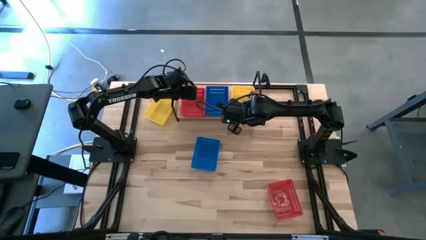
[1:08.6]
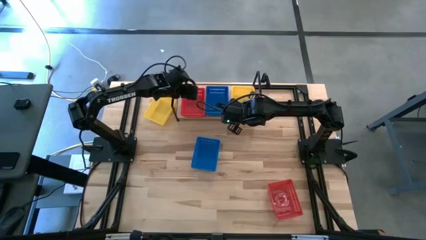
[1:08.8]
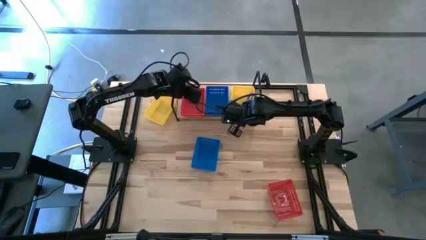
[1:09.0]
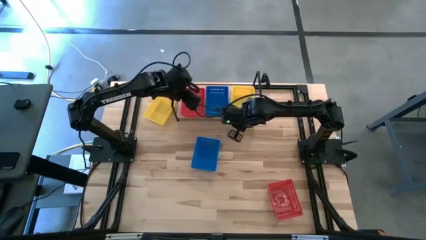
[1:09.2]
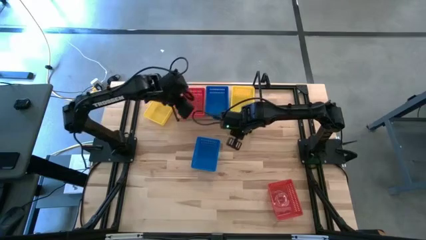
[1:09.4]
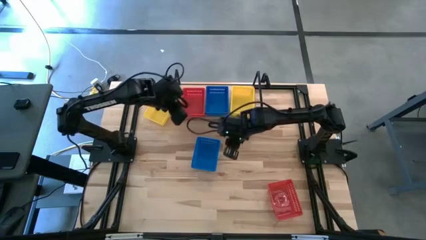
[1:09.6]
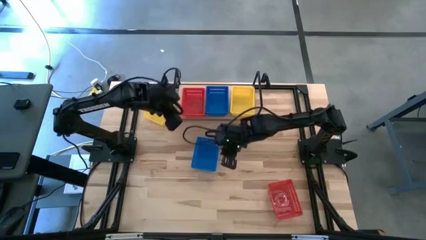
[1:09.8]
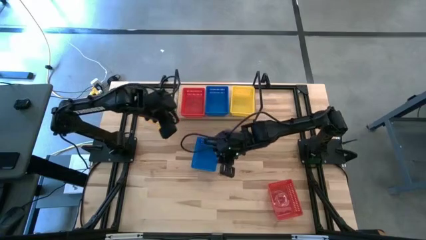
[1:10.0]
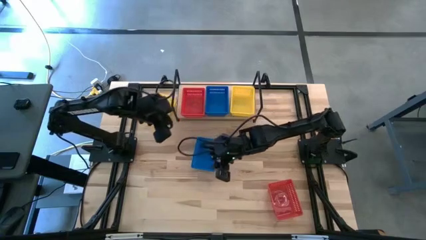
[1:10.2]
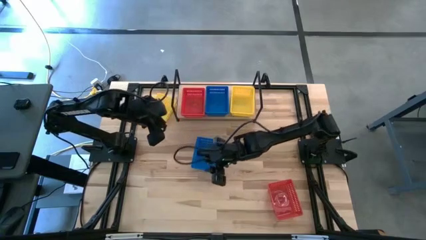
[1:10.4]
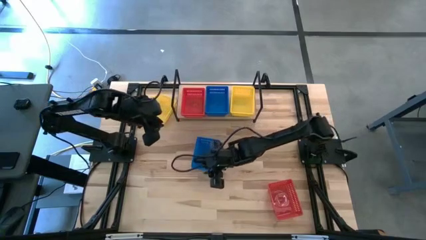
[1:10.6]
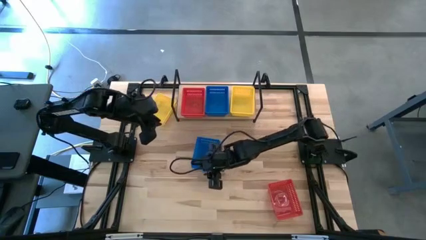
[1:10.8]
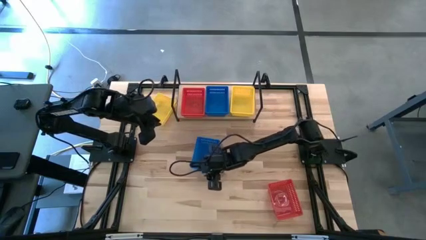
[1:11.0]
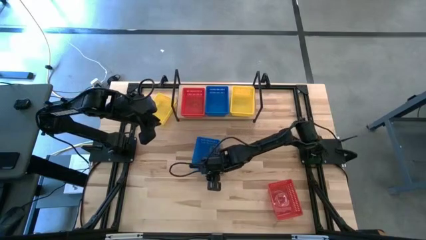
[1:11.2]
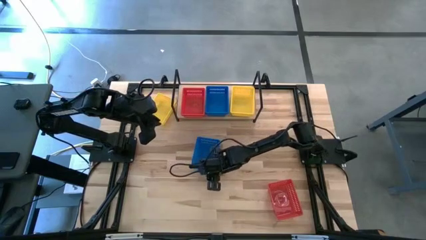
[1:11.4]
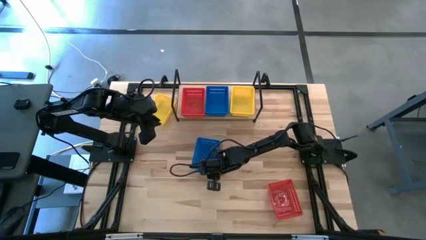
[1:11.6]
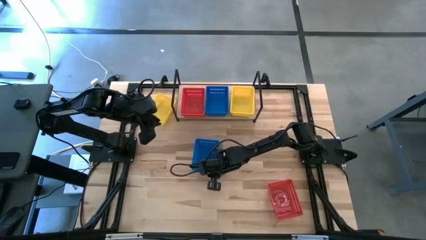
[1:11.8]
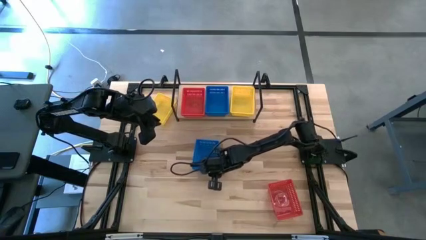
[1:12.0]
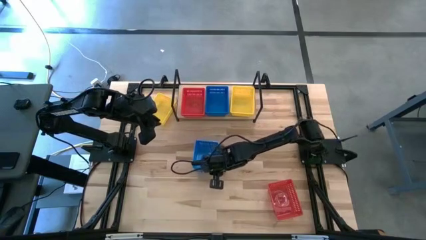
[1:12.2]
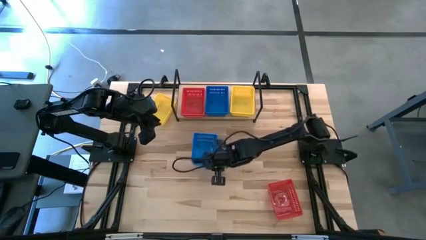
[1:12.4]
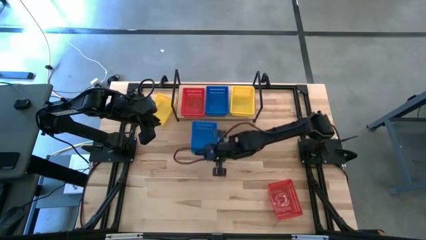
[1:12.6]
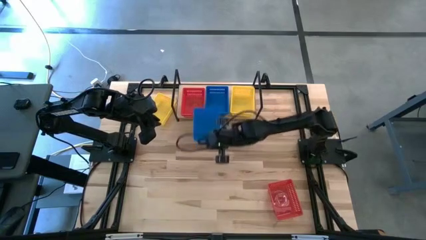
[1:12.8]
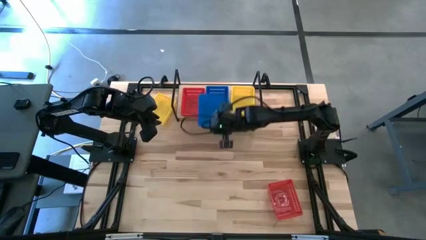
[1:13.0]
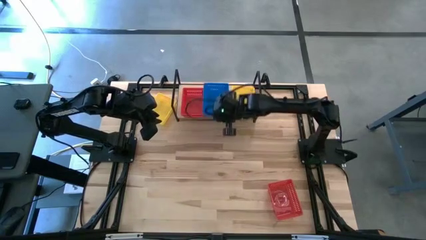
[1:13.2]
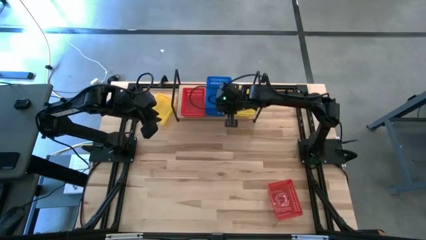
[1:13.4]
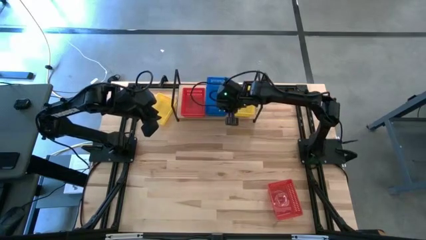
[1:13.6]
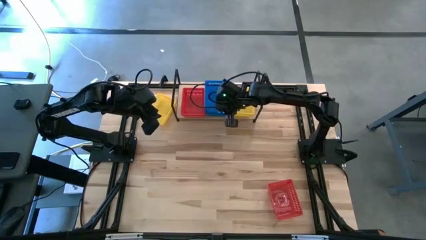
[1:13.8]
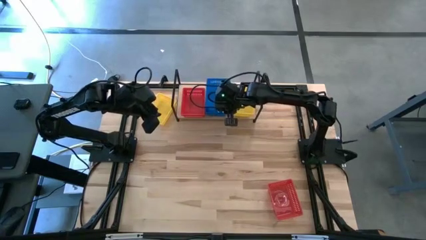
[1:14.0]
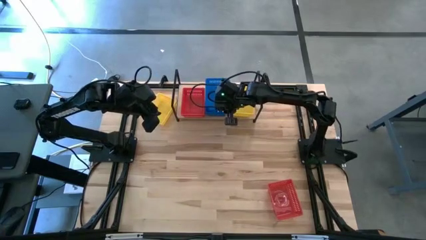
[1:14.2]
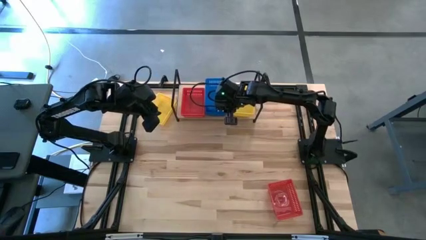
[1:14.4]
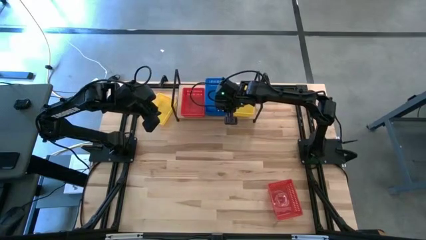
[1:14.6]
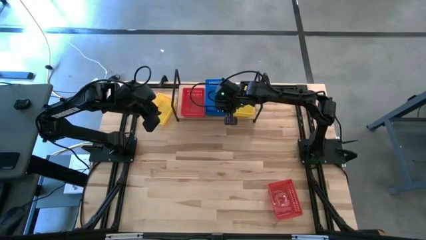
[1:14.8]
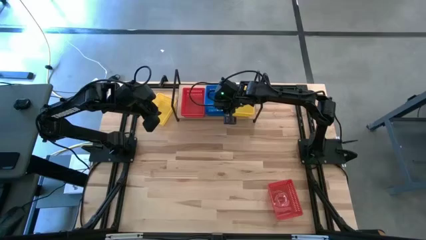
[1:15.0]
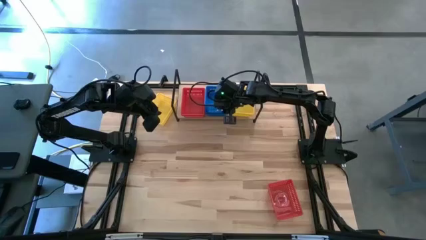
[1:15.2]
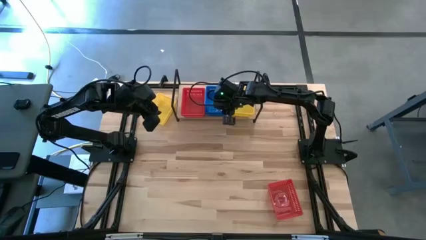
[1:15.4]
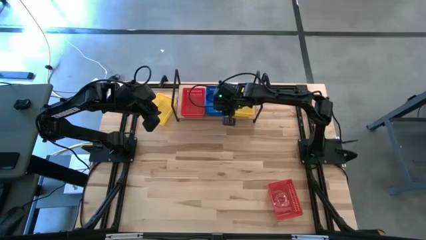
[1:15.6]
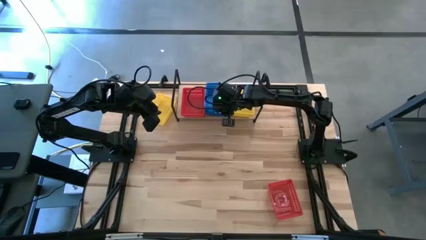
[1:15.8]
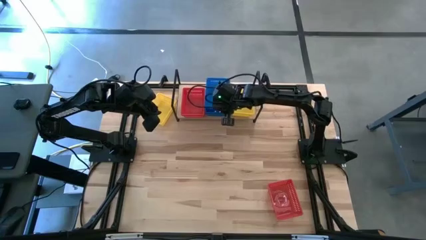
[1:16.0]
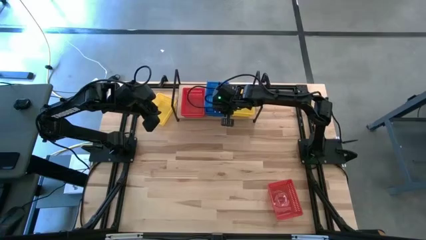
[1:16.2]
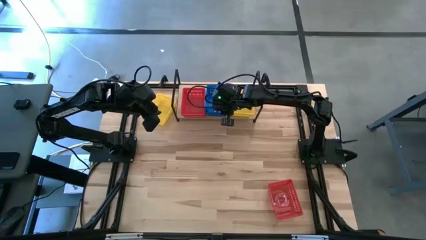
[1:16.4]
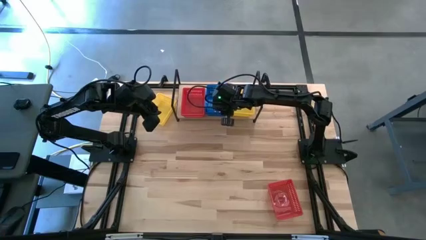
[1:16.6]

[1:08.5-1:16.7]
Task: Stack baskets on shelf by color
Stack the blue bin on top of the blue bin on the shelf

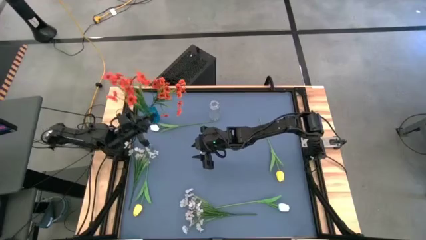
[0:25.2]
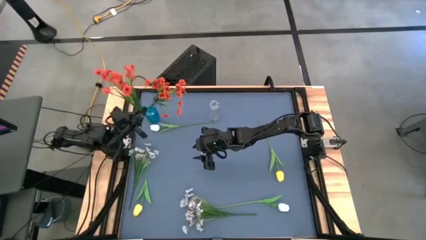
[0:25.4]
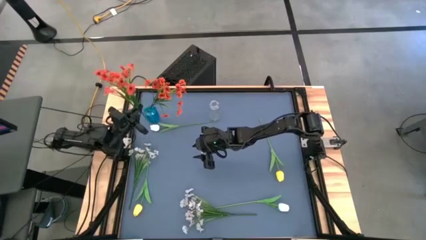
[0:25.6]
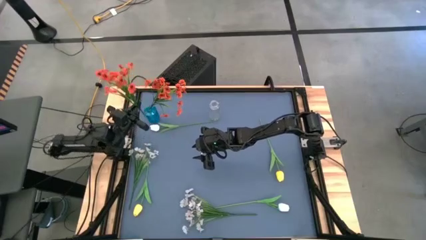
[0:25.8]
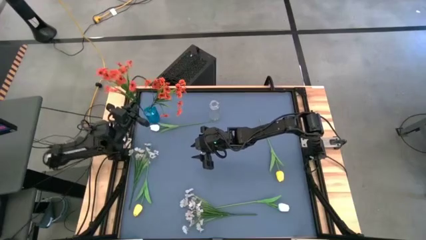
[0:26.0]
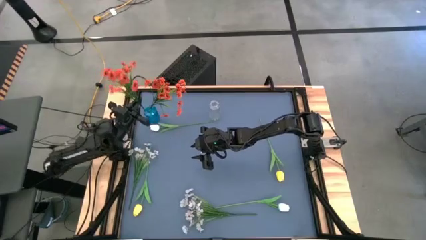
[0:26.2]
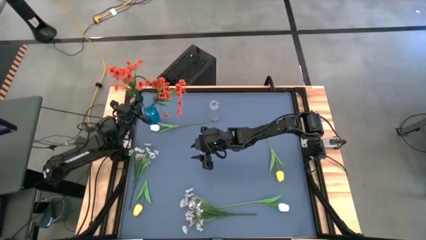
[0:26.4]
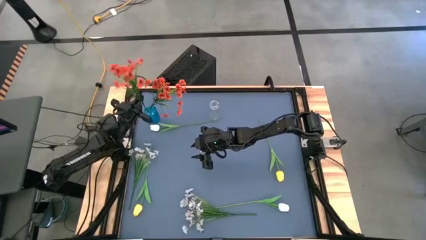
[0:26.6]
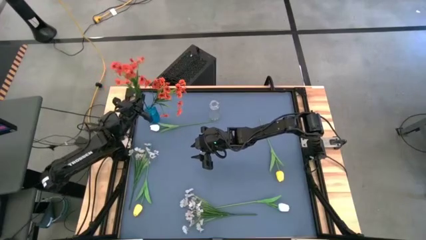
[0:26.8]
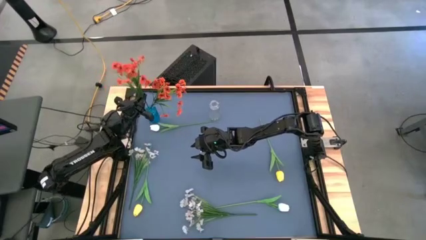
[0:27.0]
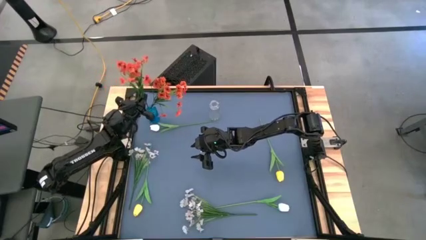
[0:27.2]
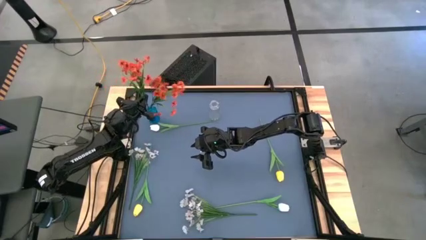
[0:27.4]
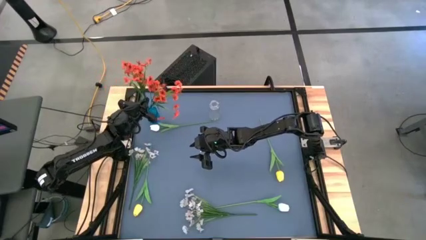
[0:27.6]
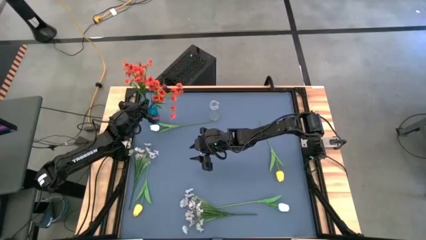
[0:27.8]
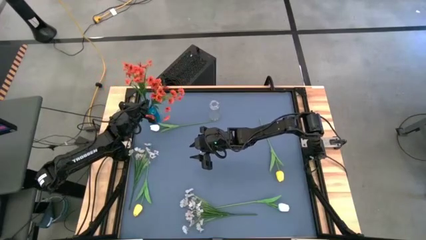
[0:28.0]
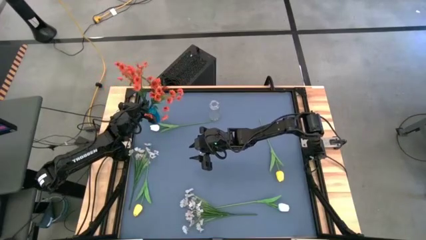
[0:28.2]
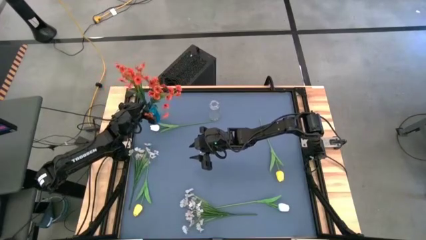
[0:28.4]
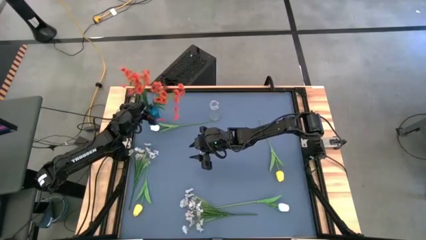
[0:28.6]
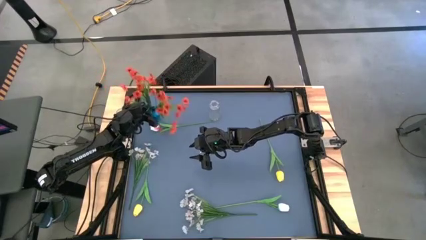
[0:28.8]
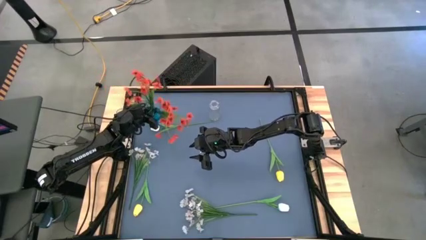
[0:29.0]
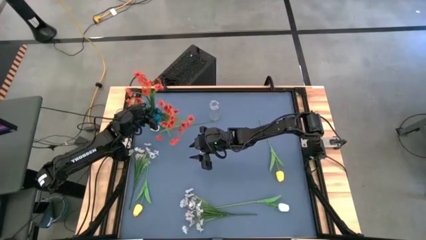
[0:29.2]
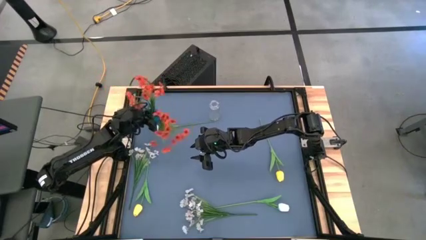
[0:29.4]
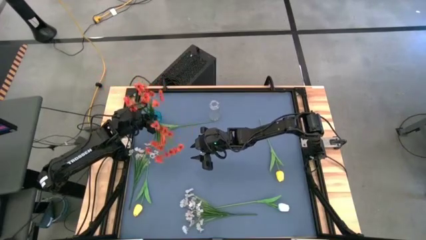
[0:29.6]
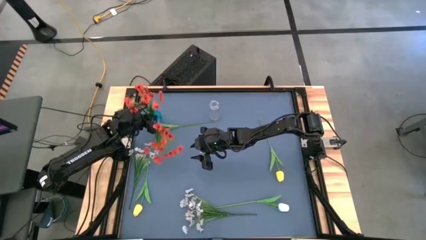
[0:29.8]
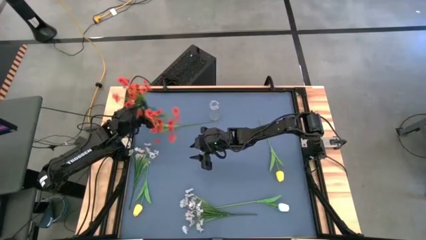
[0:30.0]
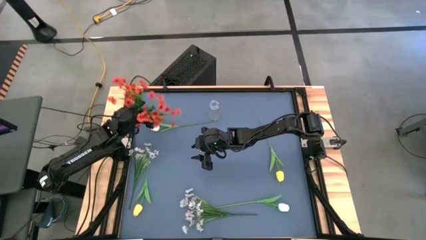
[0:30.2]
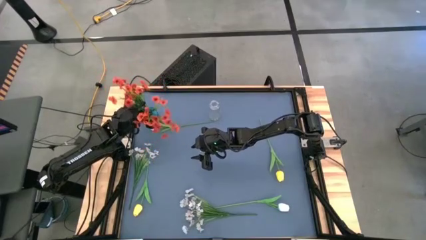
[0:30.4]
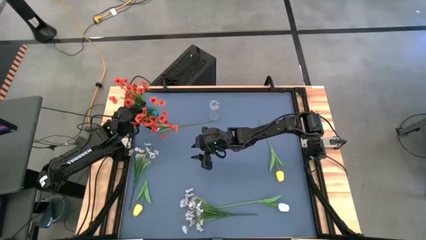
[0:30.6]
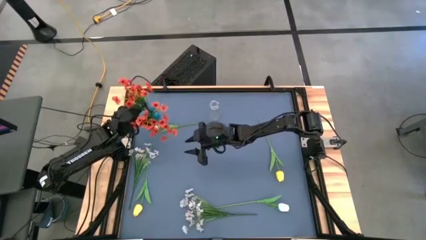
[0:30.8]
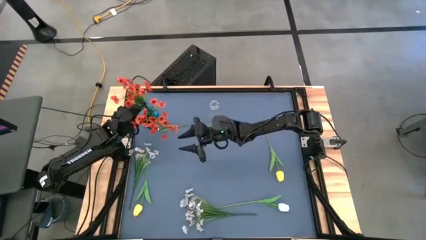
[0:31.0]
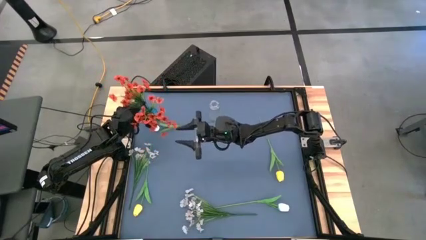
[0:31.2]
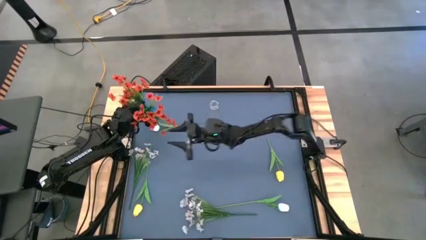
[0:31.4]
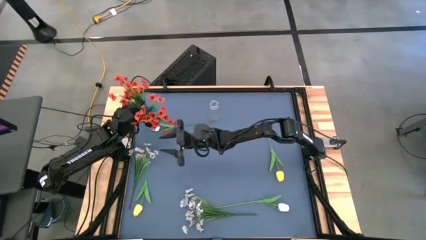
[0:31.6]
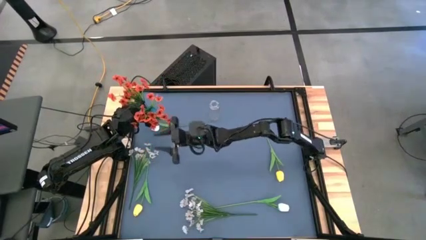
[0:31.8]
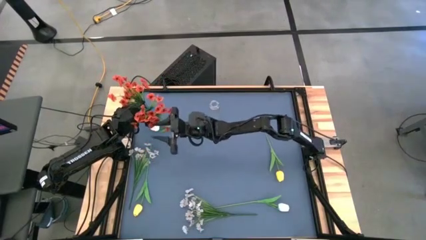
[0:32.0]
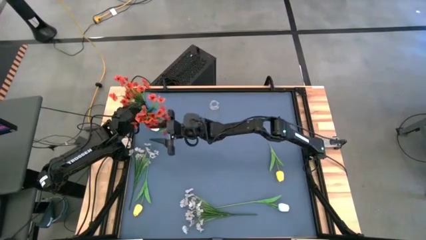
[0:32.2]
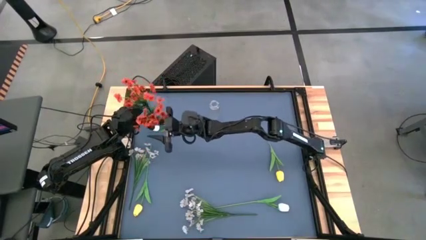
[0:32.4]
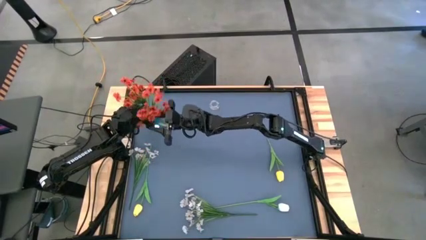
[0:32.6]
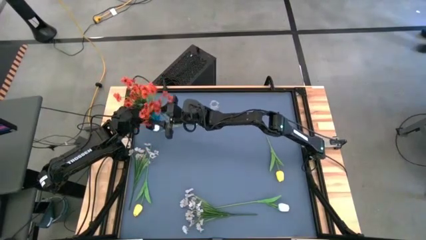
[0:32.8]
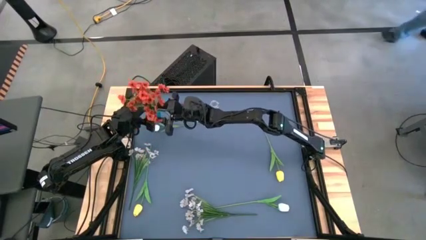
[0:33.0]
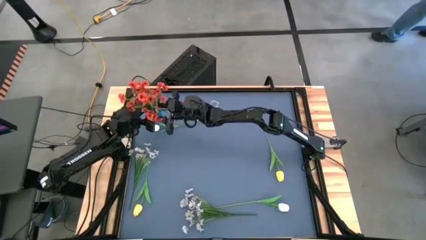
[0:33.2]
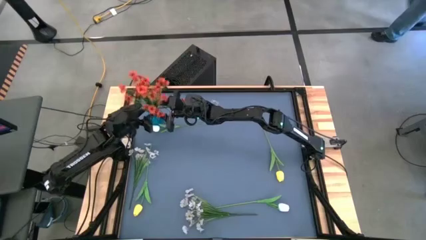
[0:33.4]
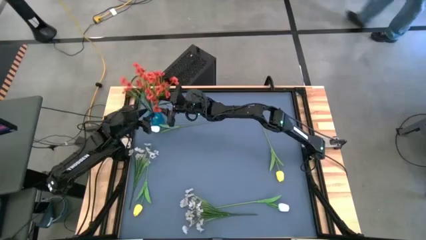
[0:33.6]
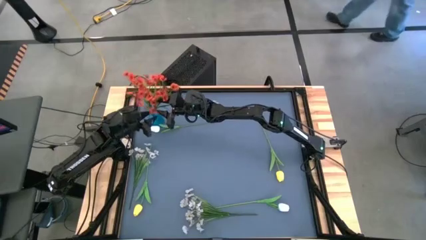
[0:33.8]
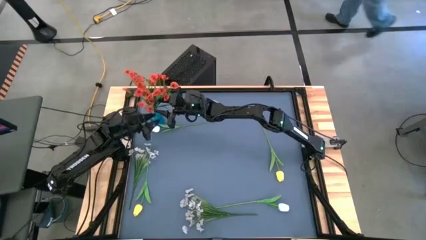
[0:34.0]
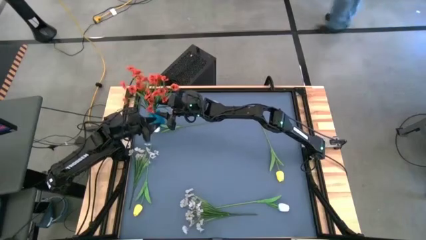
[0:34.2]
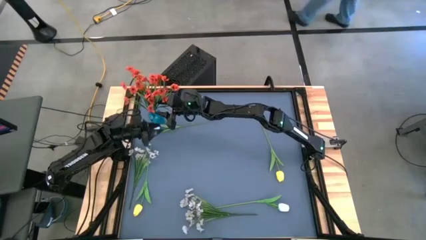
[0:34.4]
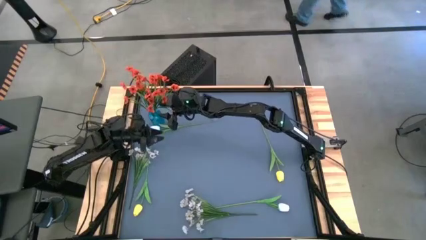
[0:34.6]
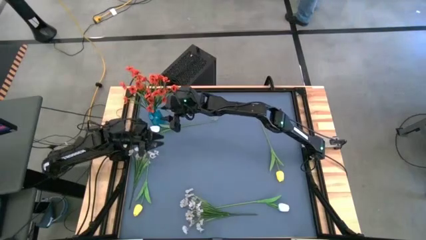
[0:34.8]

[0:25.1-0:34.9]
Task: Sort flowers into vase by color
Put the orange flowers into the blue vase
